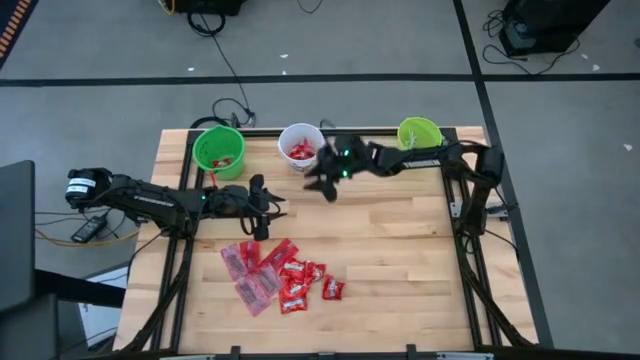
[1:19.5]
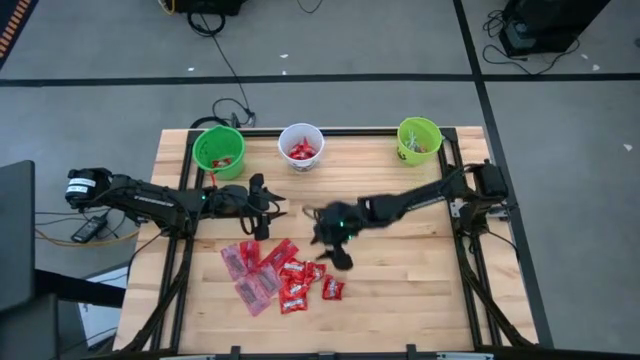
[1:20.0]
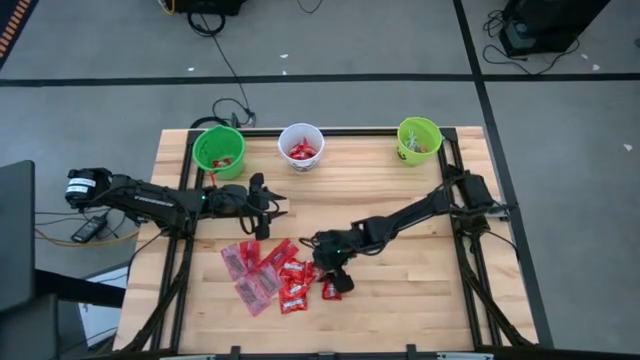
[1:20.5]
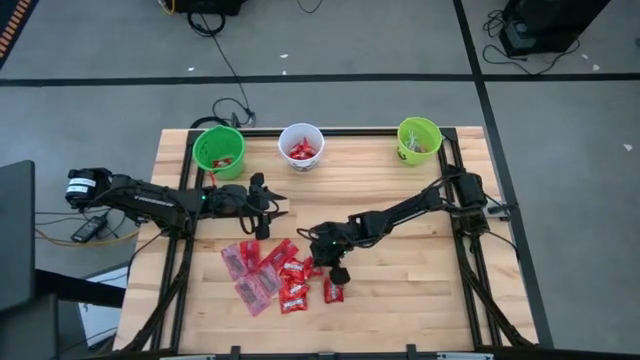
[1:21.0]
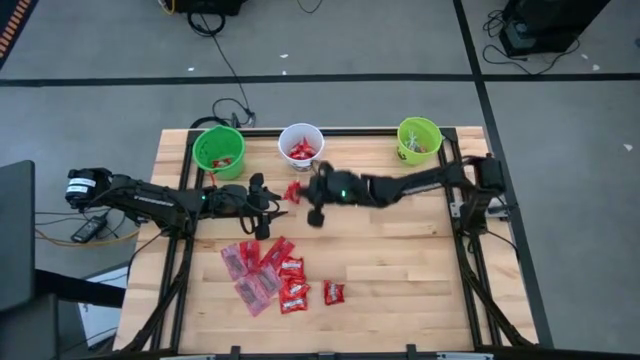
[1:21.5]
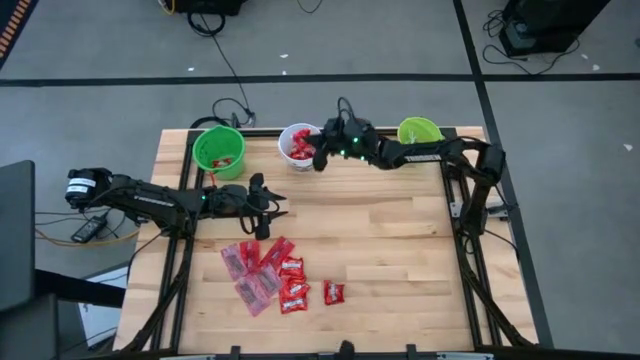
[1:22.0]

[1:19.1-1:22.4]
Task: Sort candy by brand, put in halloween buckets
Put the red candy into the white bucket

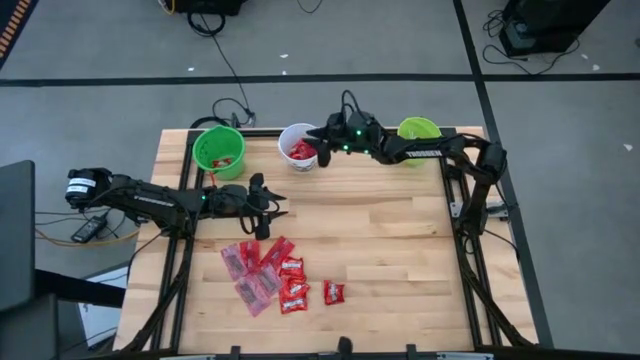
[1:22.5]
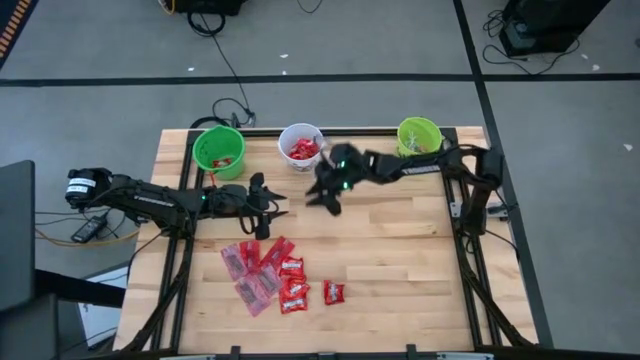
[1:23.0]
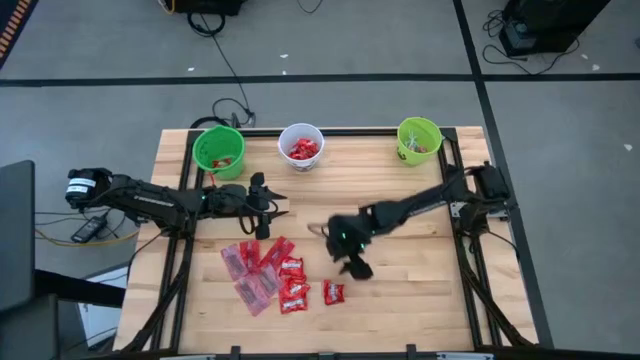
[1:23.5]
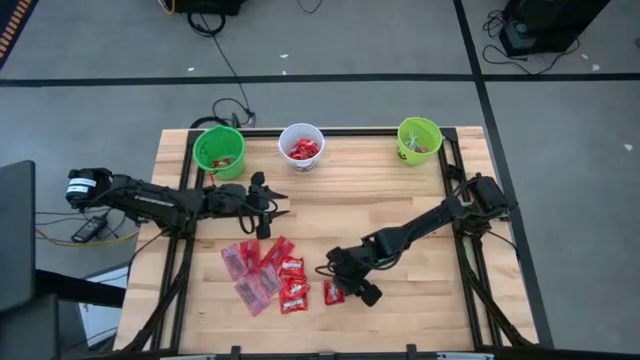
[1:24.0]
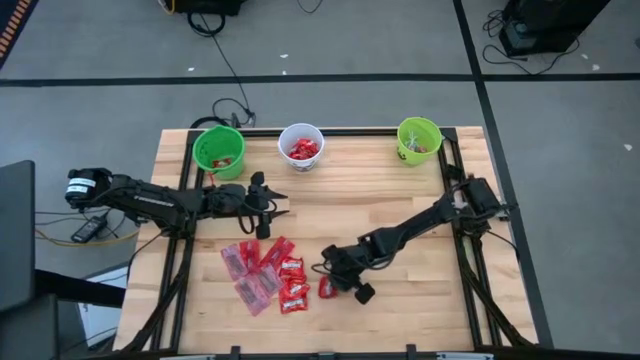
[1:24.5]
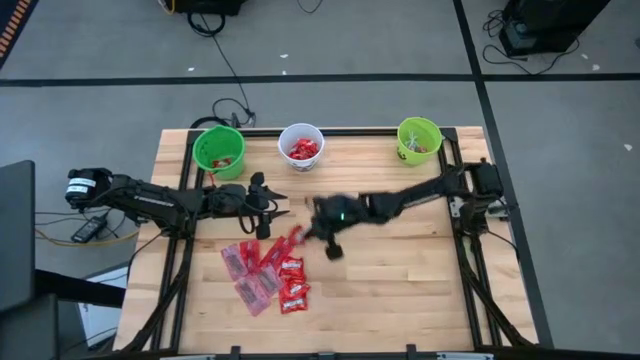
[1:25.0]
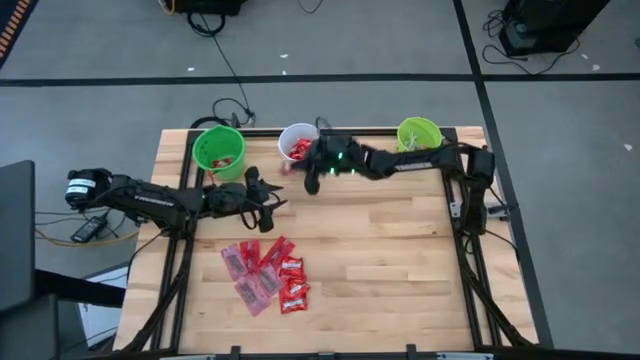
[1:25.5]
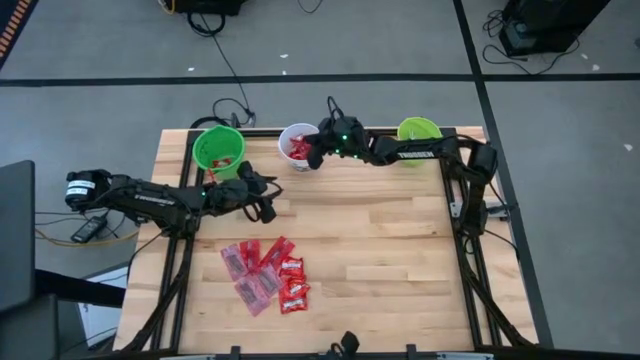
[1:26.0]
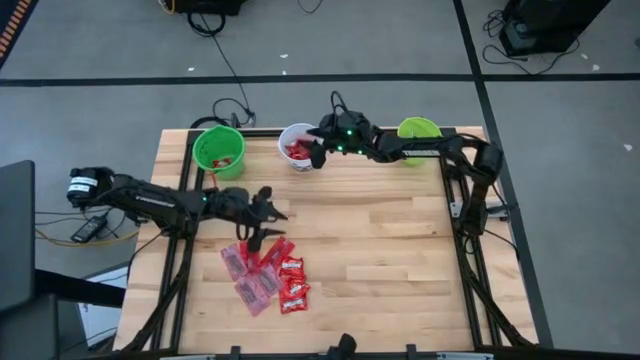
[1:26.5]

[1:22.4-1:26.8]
Put the red candy into the white bucket

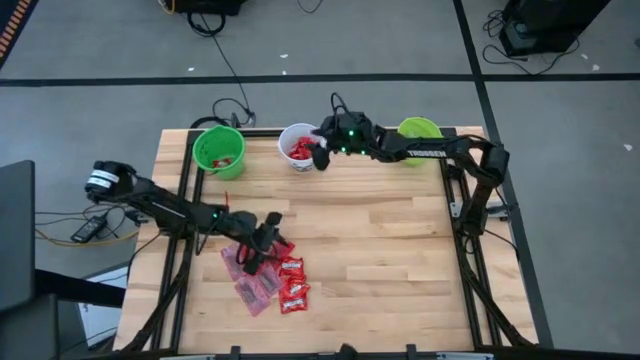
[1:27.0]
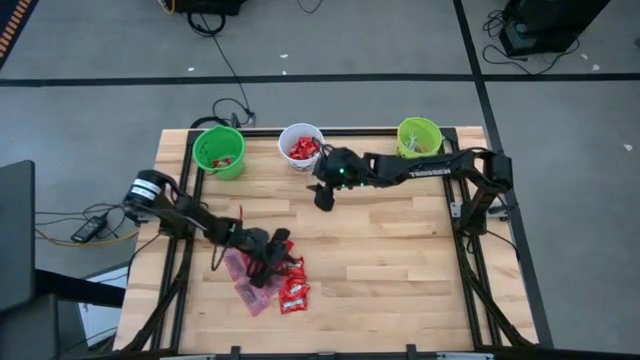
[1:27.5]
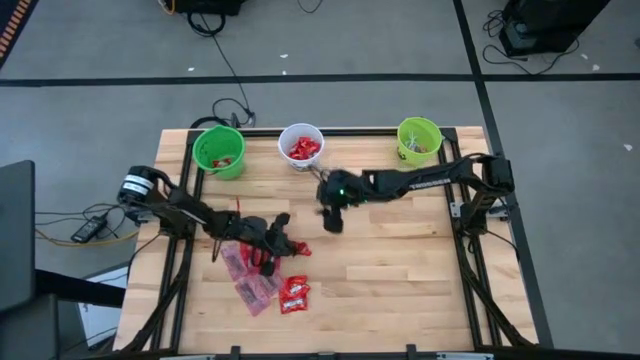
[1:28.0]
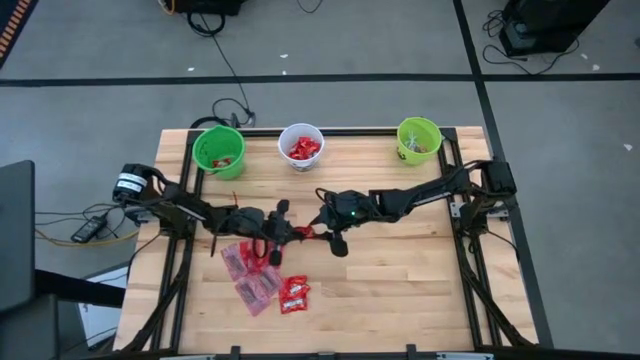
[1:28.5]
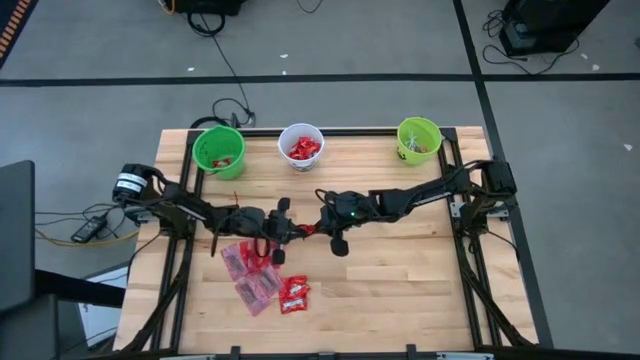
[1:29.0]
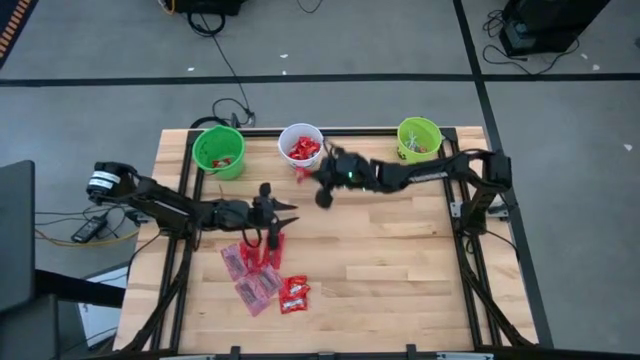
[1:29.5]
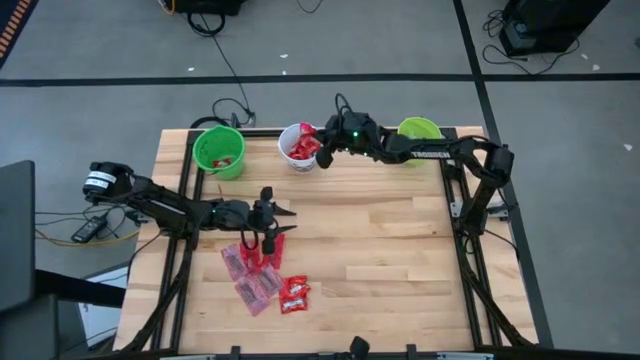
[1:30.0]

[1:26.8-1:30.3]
Put the red candy into the white bucket

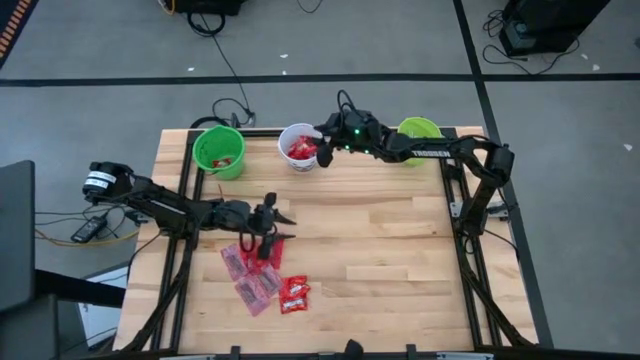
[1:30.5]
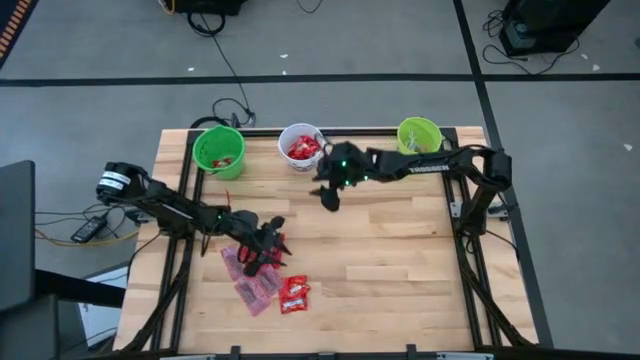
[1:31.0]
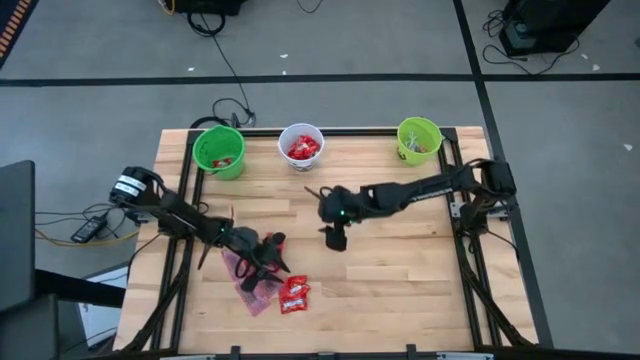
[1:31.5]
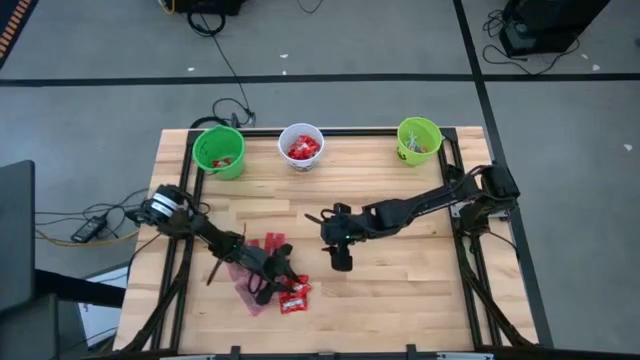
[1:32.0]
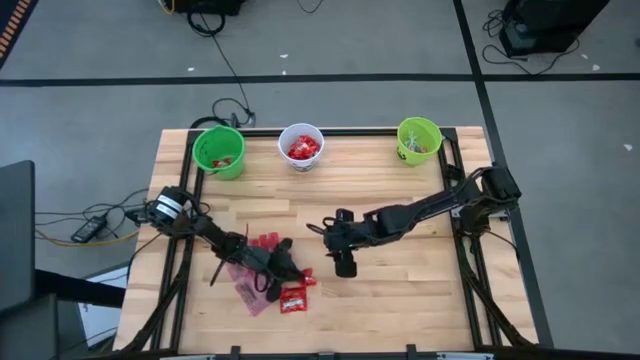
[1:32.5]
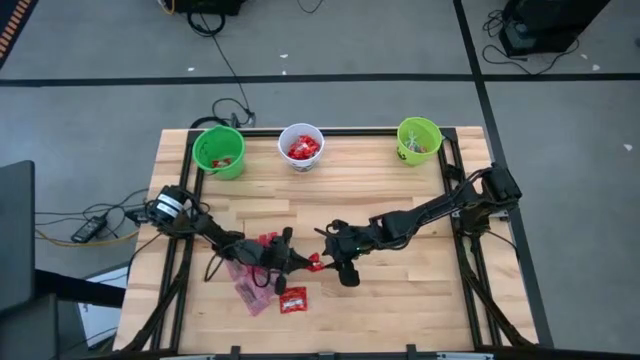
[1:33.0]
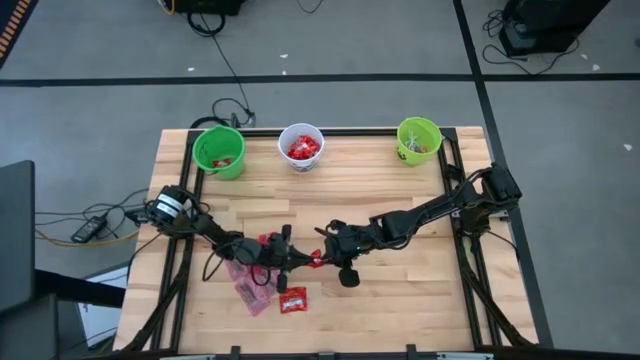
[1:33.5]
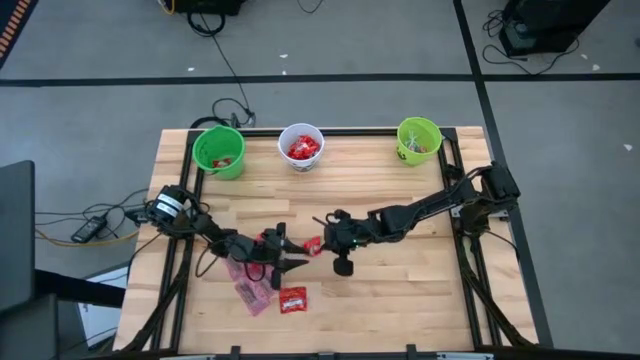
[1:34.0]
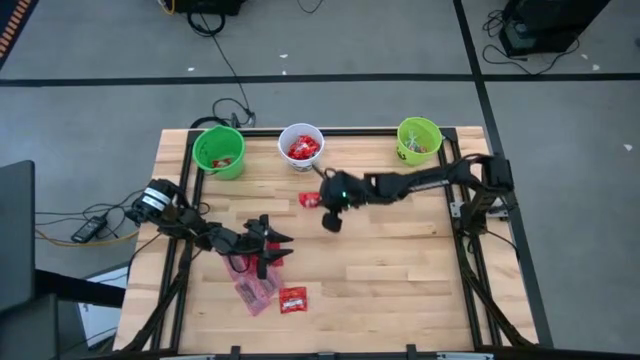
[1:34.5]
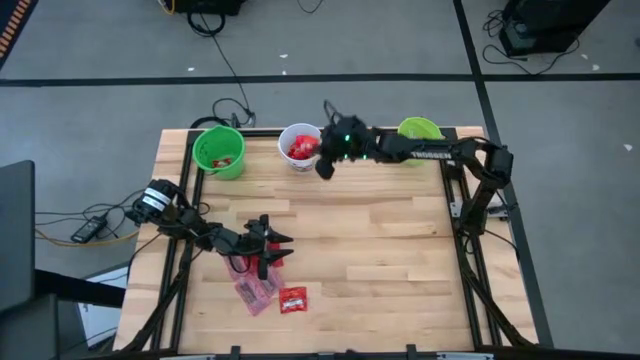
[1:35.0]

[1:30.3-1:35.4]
Put the red candy into the white bucket

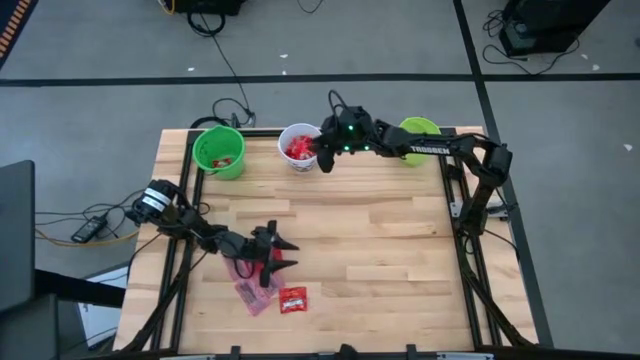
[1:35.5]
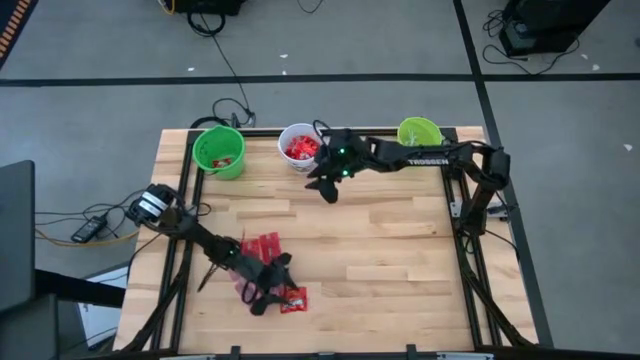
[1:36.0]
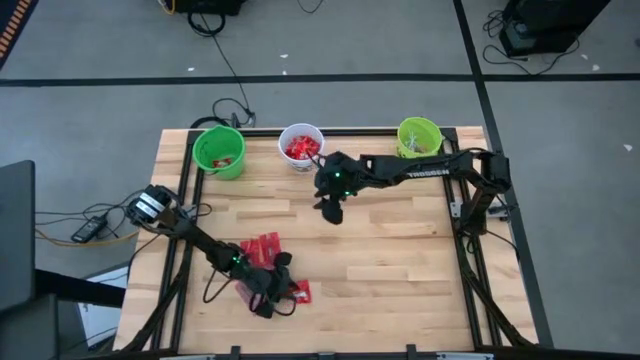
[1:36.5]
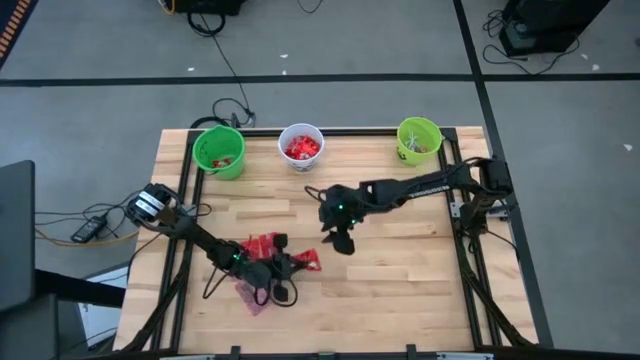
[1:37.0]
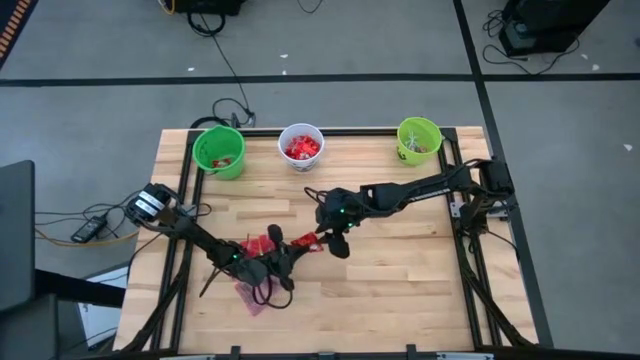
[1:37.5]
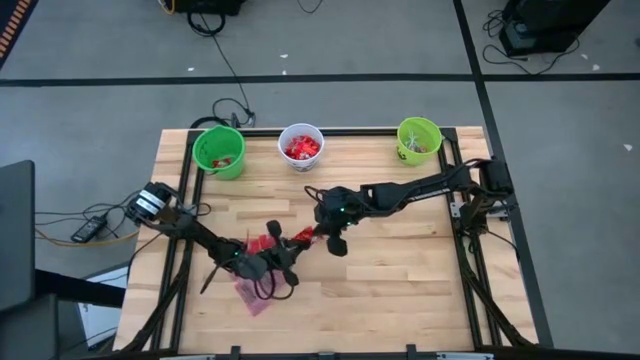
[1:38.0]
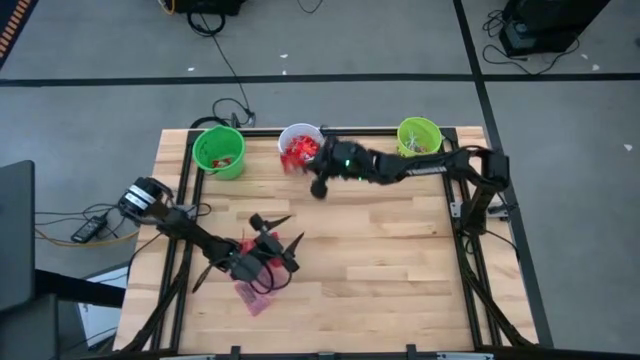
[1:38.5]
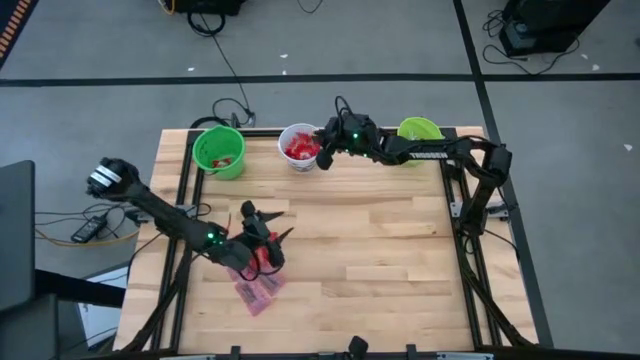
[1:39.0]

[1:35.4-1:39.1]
Put the red candy into the white bucket

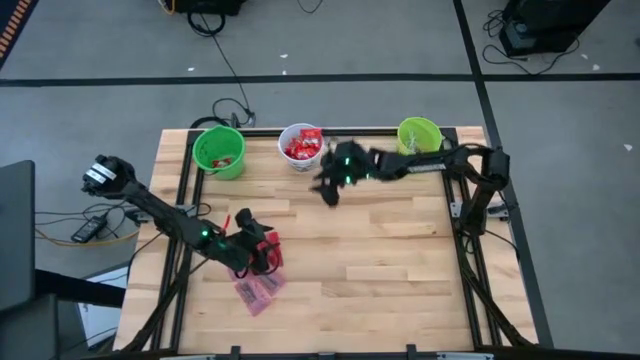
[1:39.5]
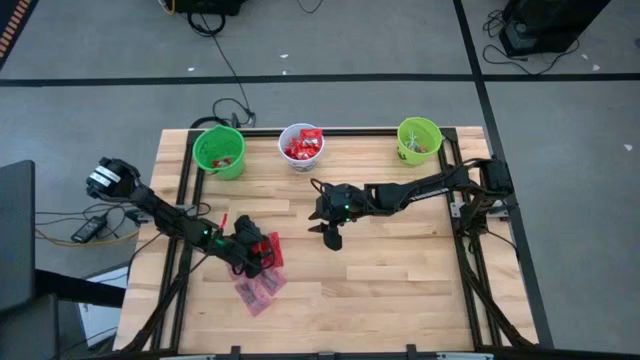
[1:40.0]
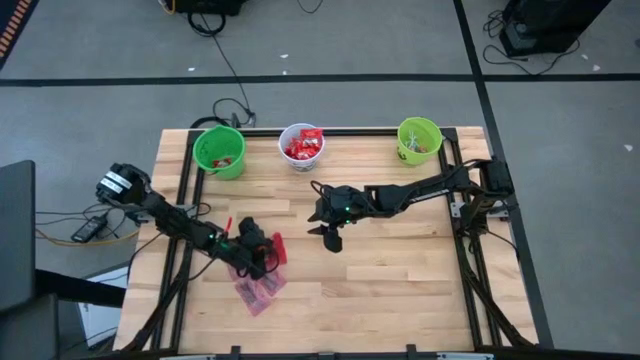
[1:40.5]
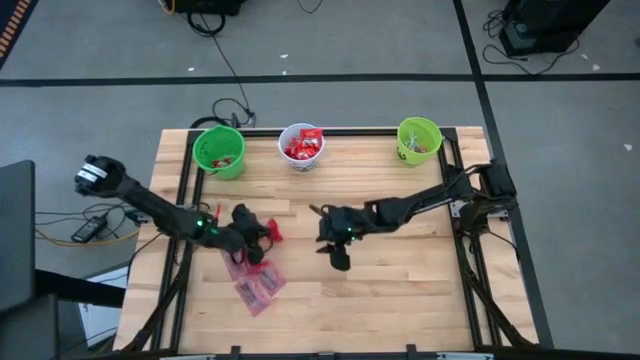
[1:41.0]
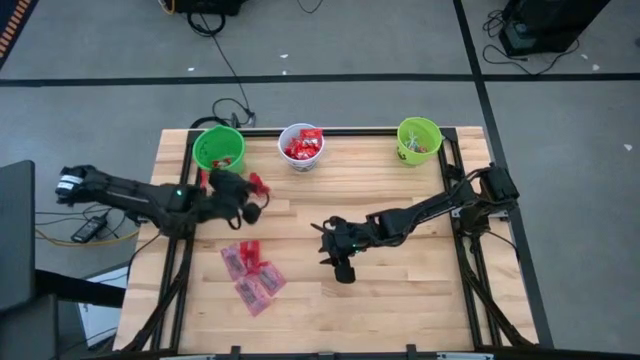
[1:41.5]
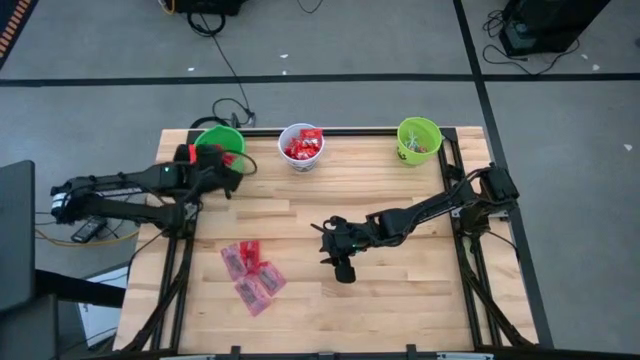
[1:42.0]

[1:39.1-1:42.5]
Put the pink candy into the green bucket
